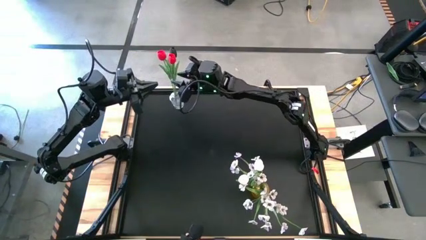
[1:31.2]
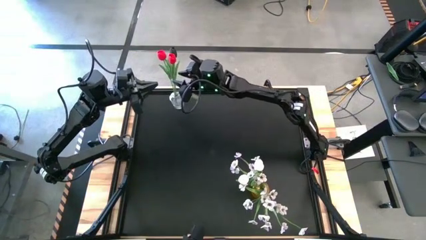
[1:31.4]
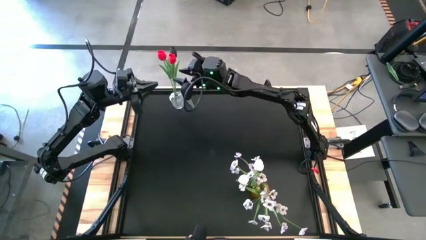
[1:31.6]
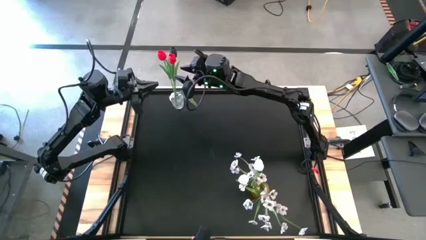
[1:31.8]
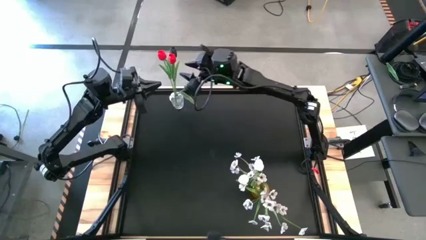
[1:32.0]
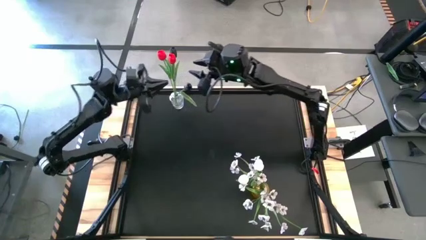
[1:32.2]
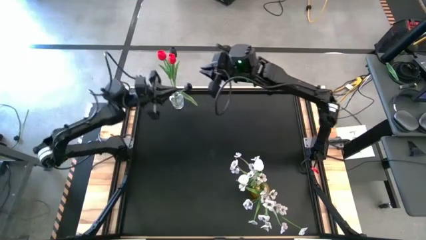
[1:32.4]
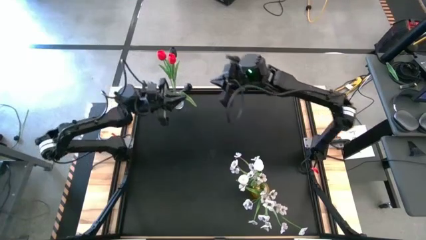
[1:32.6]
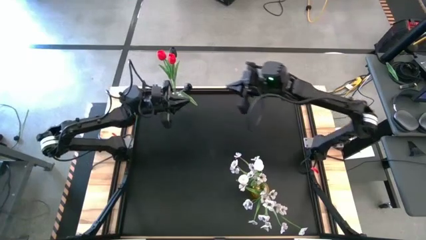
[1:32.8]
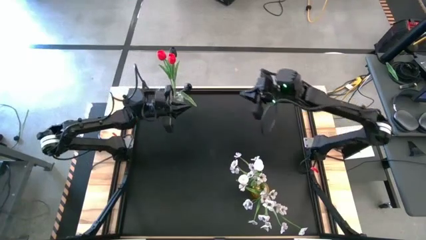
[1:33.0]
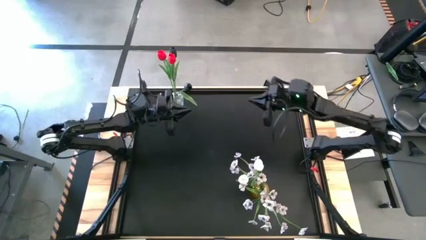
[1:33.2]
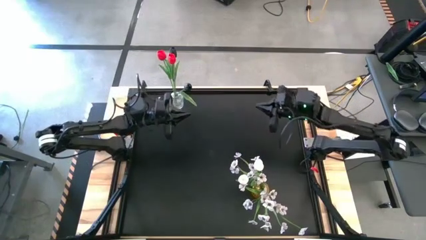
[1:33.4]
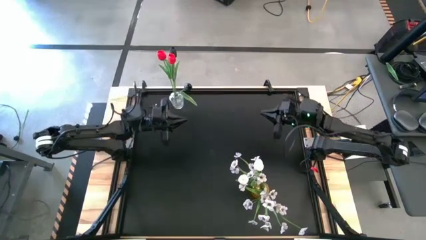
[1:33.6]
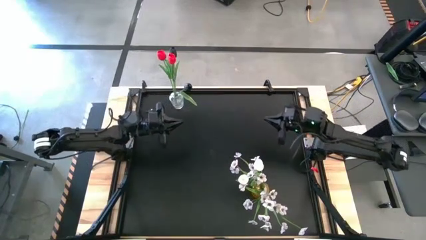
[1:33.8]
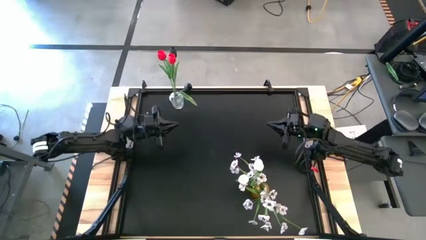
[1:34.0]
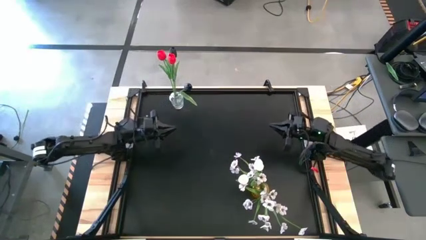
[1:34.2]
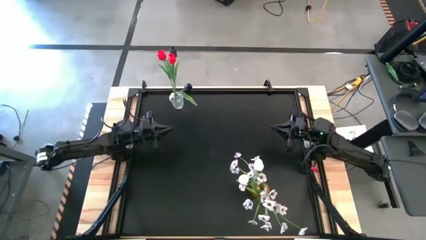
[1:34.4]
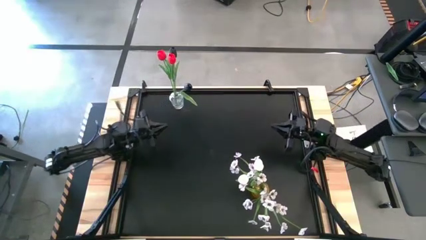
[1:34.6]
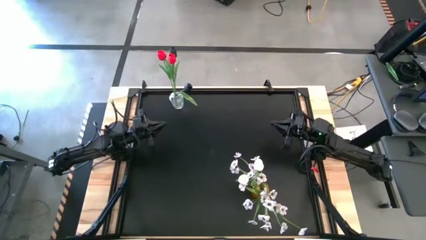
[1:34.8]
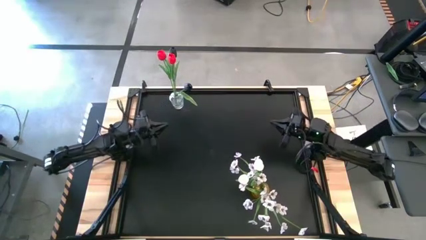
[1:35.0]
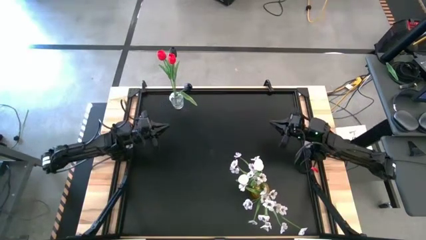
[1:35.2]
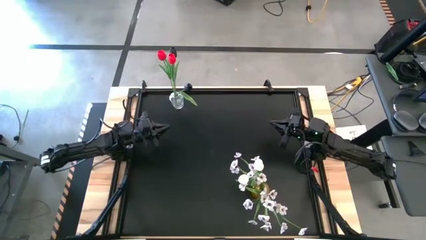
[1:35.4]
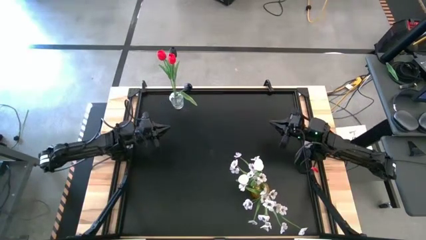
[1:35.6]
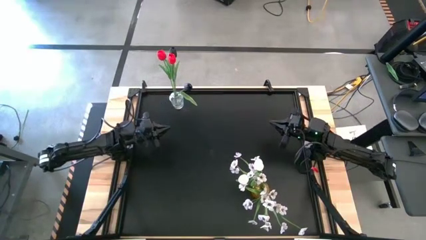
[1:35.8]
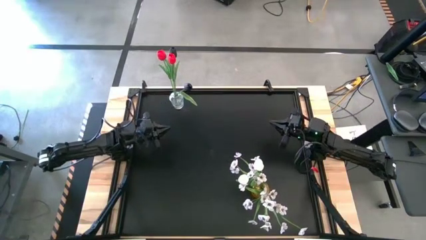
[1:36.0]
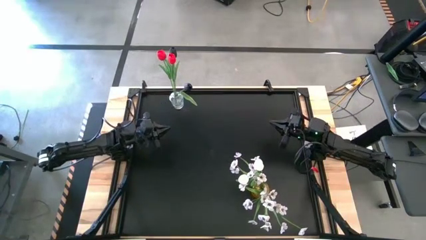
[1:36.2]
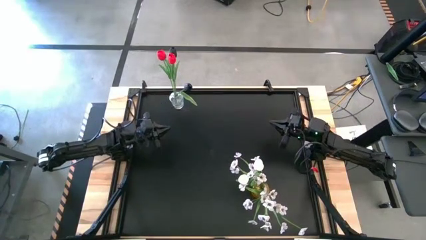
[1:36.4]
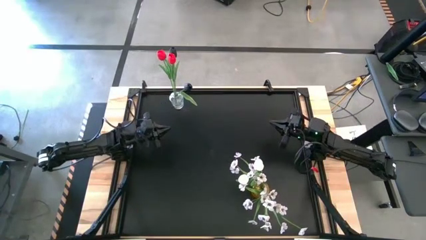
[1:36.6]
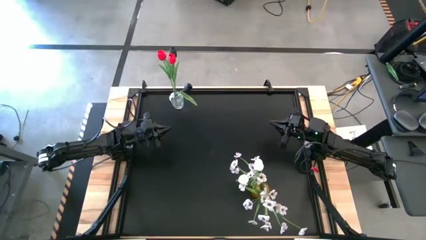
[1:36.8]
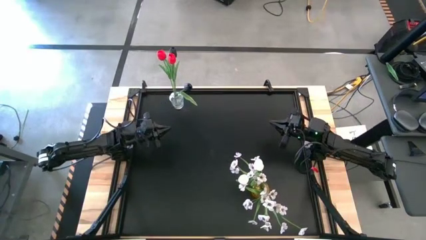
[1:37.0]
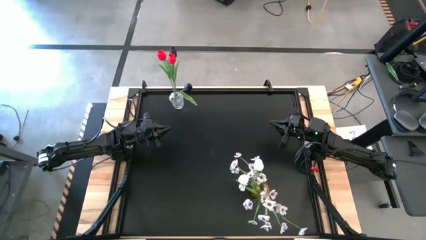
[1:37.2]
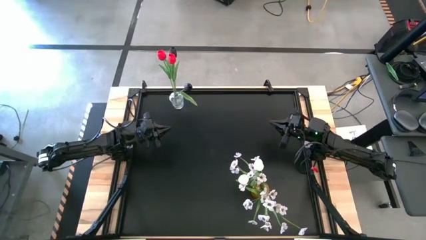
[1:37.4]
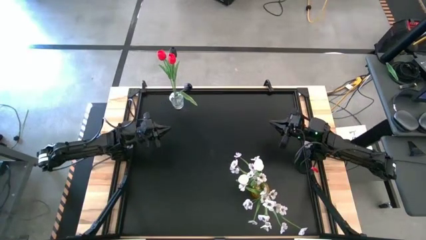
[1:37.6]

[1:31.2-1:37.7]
Task: Sort flowers into vase by color
Return to Home Position

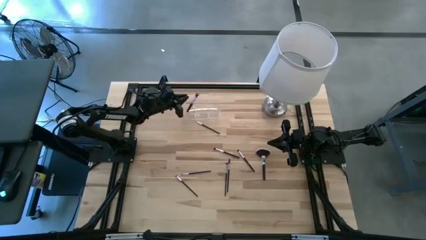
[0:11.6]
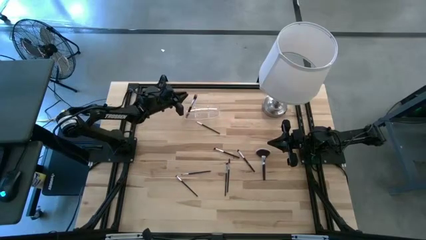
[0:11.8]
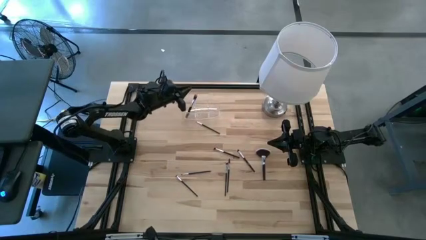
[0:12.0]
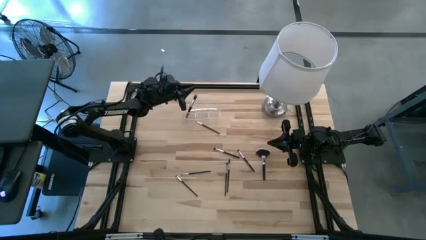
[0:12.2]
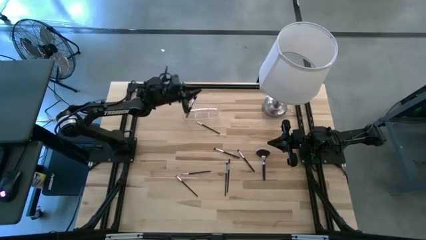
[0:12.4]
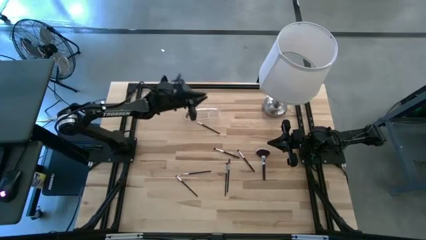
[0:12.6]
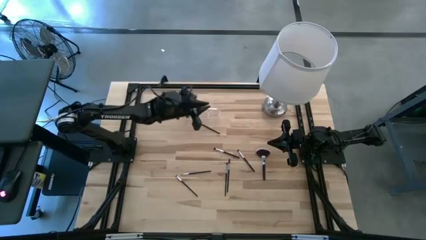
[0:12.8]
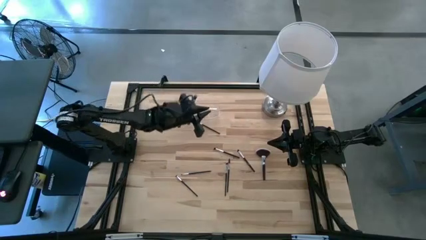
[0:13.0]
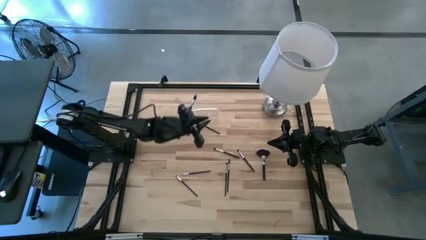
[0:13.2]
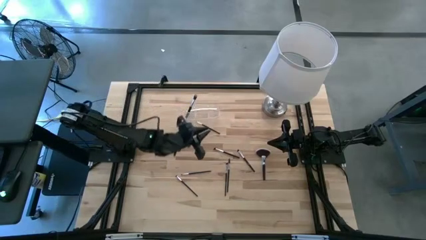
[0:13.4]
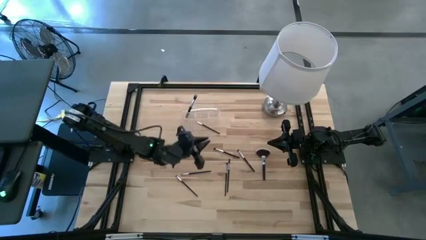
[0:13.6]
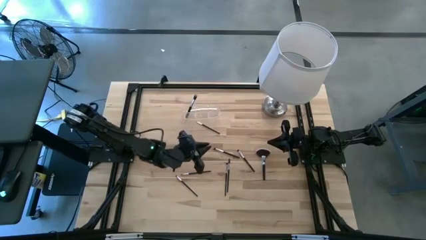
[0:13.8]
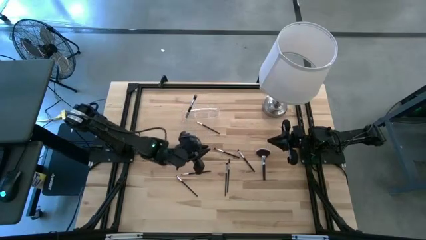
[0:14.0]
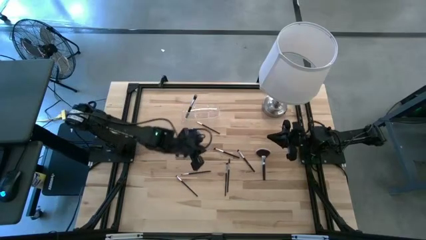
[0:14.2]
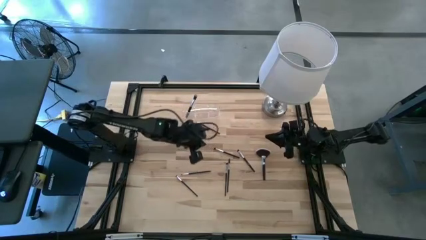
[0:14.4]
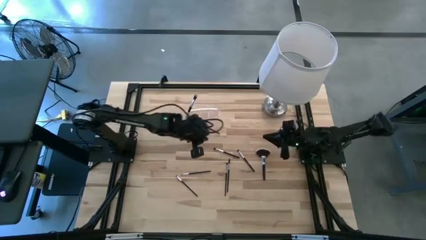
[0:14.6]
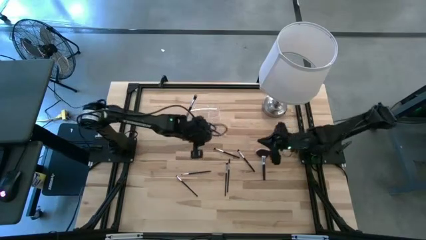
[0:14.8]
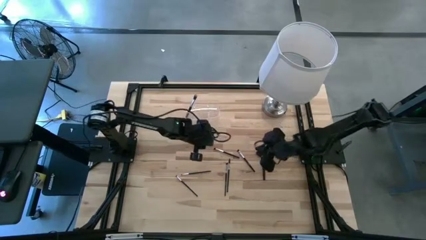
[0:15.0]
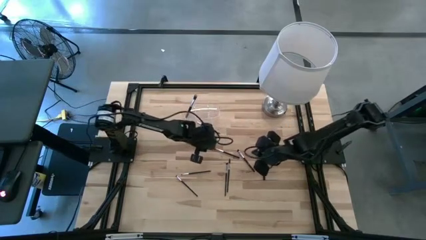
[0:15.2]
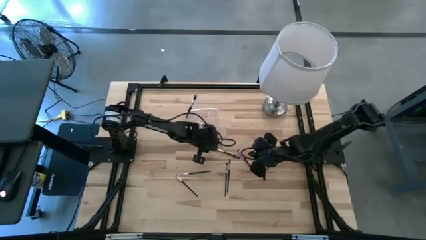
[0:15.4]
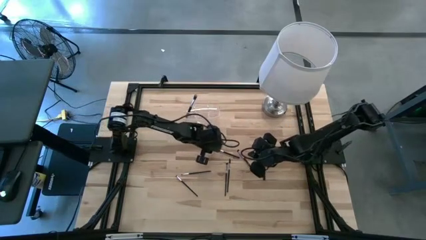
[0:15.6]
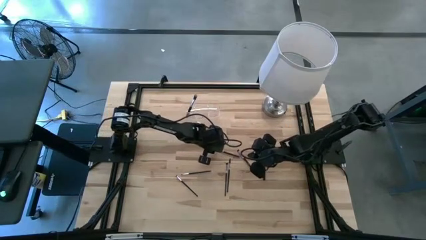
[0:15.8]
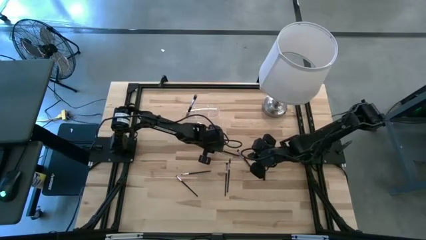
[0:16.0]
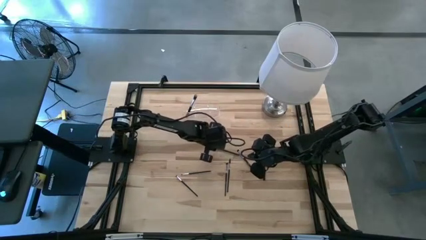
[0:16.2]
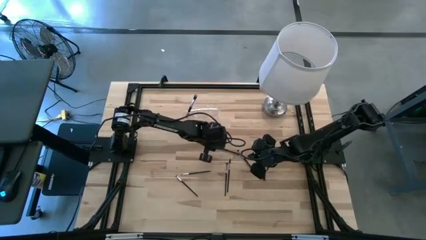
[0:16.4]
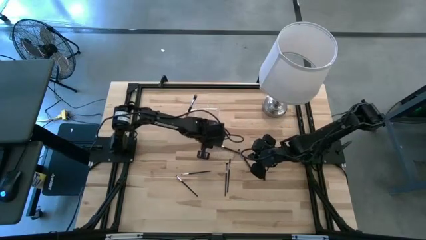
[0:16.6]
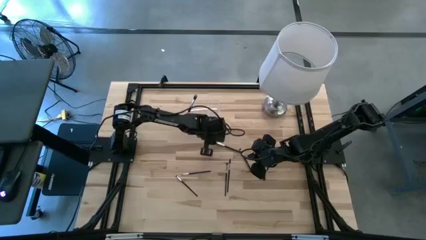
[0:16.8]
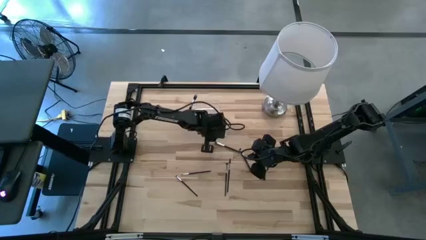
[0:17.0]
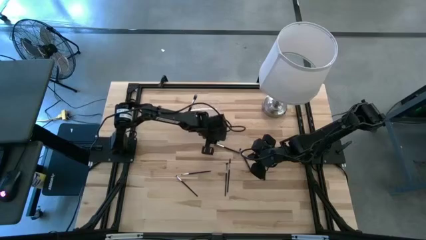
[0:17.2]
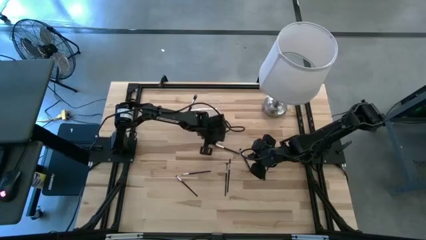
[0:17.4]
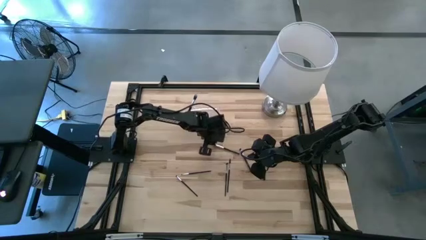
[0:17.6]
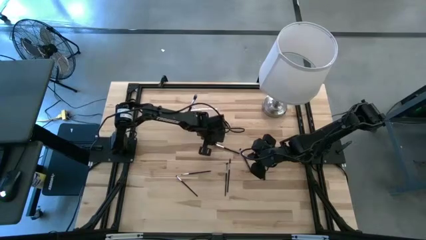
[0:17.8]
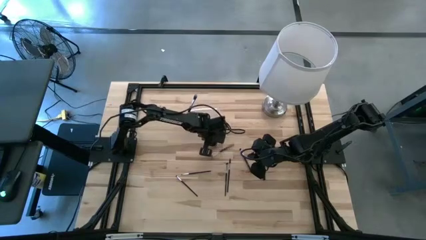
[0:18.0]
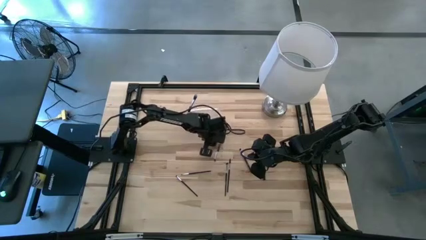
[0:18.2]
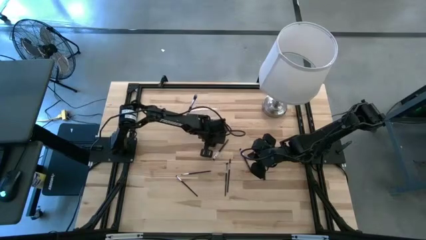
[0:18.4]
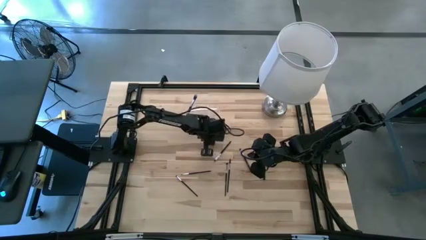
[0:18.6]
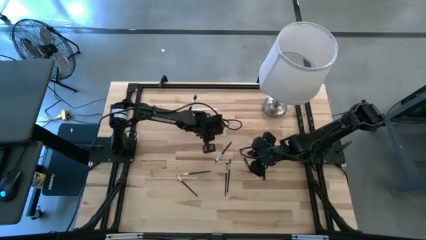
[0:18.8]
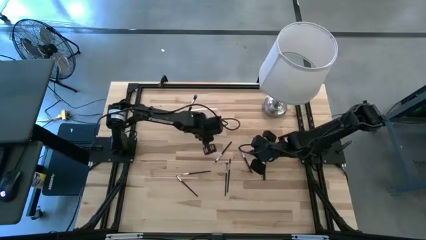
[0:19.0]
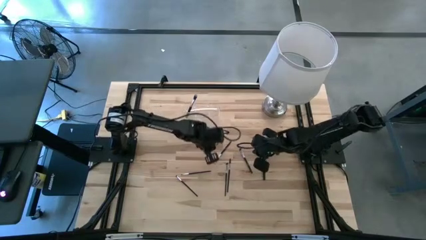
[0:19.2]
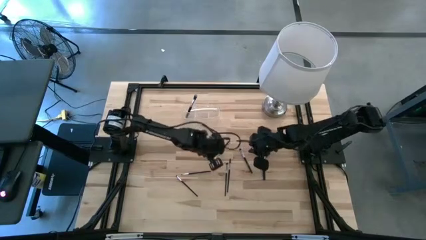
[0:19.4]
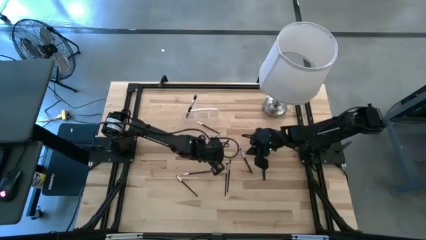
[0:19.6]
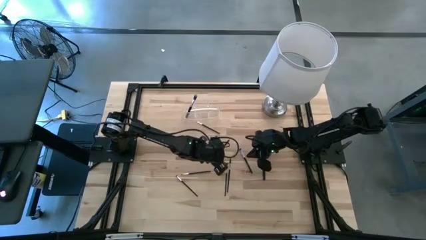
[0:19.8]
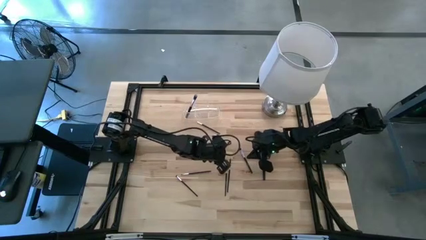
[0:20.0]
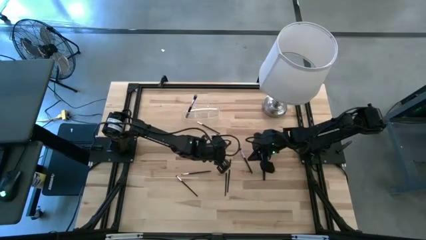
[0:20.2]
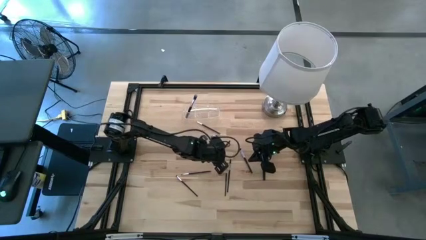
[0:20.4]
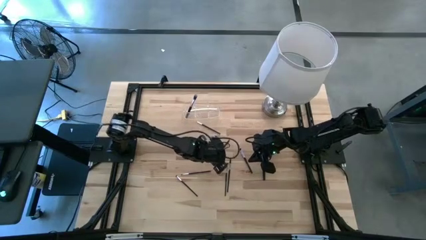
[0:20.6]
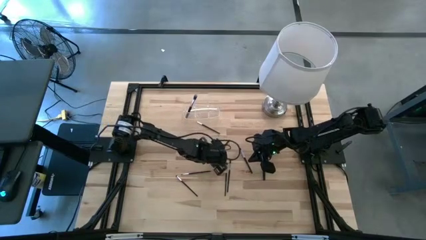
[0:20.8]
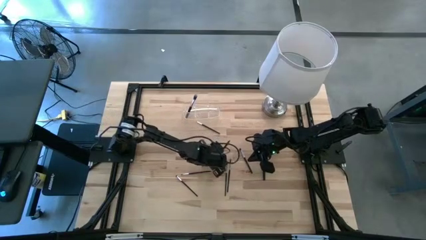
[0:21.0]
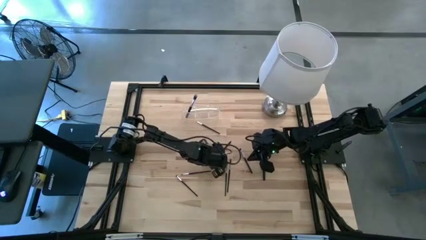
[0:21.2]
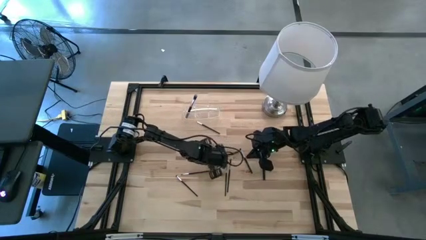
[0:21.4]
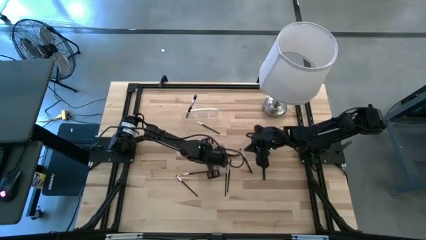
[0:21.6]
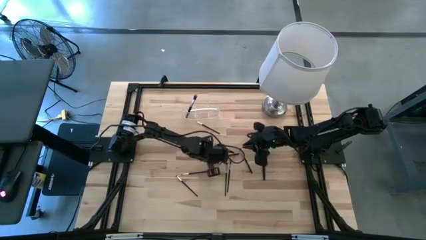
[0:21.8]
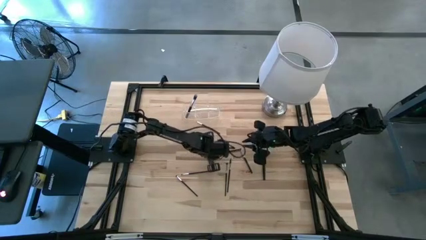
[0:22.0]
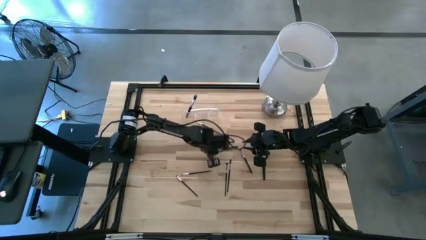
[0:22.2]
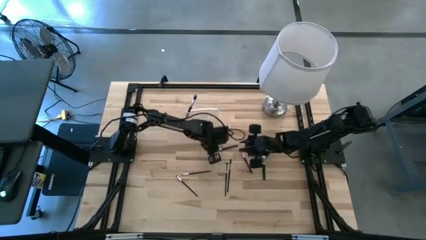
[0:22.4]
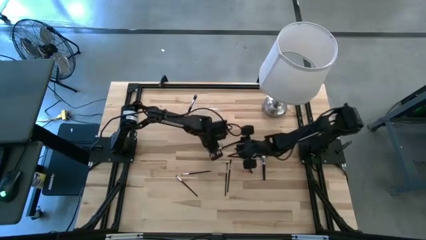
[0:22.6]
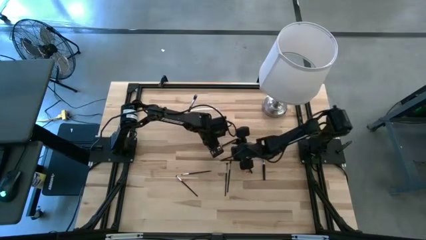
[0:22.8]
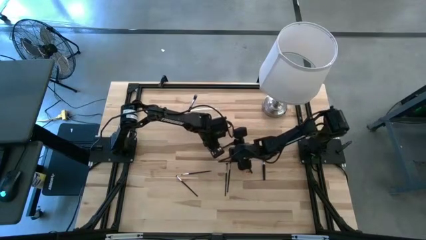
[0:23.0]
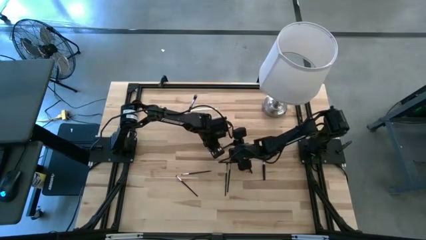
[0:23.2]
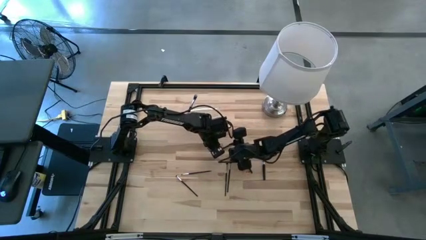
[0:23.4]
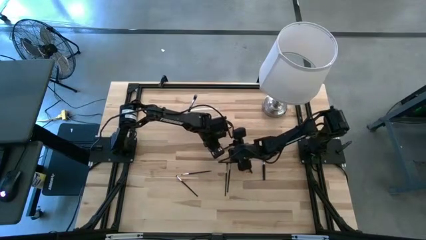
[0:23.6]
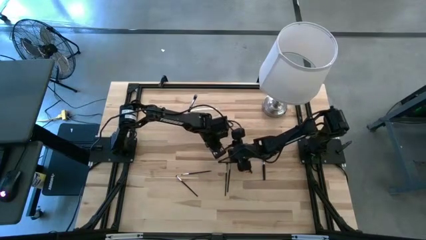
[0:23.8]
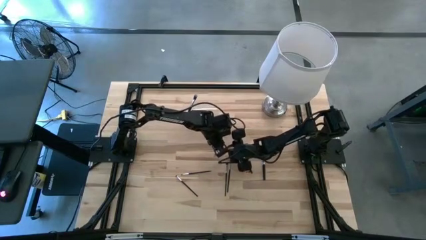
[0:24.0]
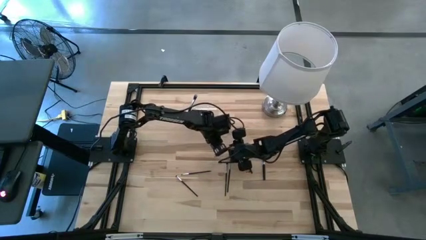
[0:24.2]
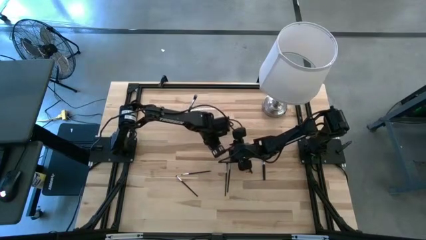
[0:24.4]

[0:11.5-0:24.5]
Task: Put items in baskets/containers
Put the foundation brush into the transparent organizer
